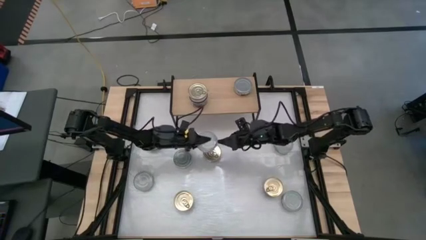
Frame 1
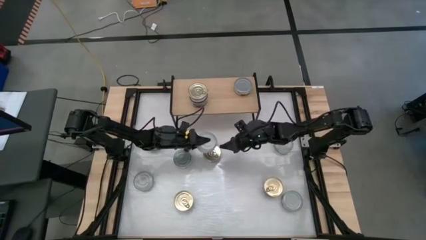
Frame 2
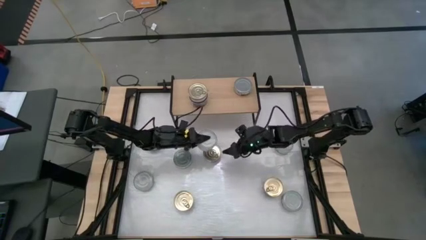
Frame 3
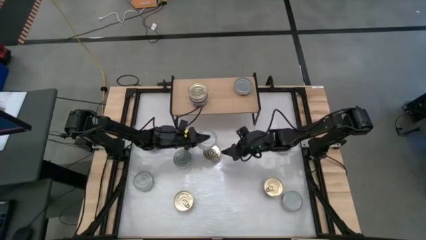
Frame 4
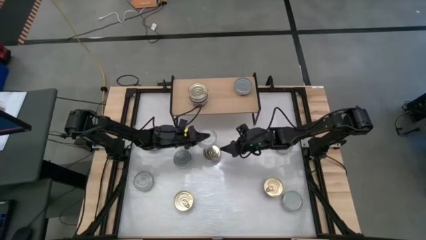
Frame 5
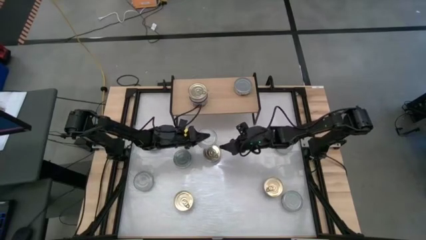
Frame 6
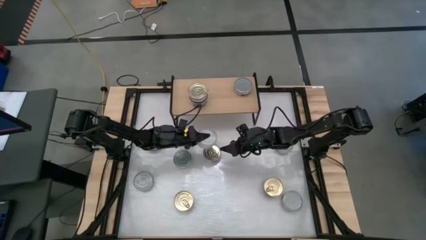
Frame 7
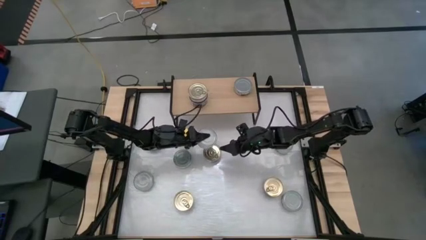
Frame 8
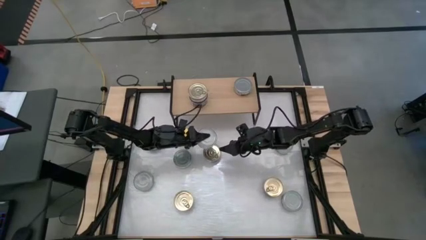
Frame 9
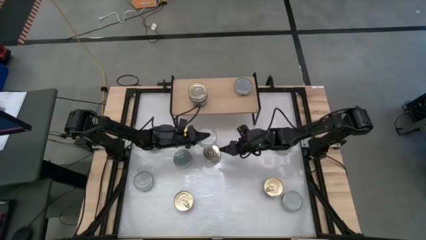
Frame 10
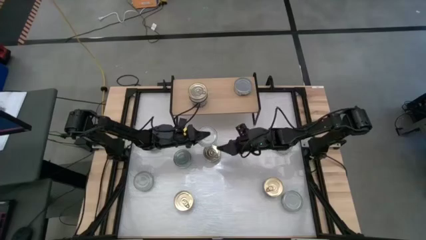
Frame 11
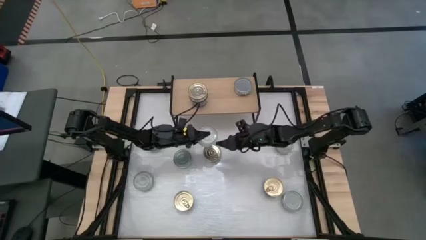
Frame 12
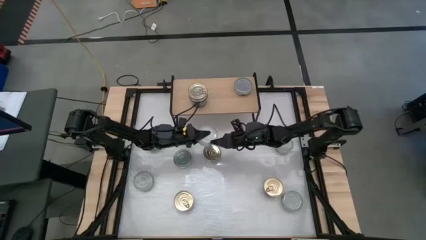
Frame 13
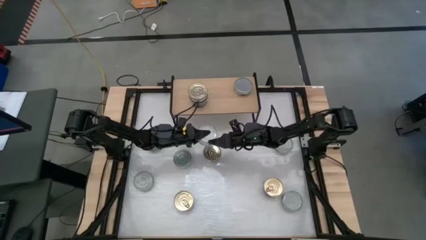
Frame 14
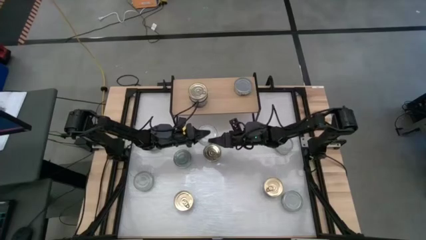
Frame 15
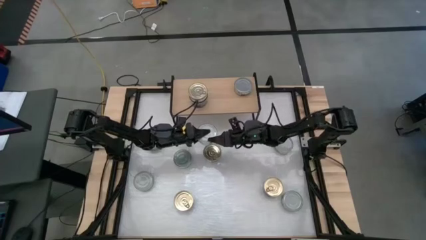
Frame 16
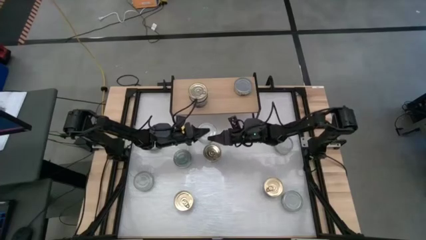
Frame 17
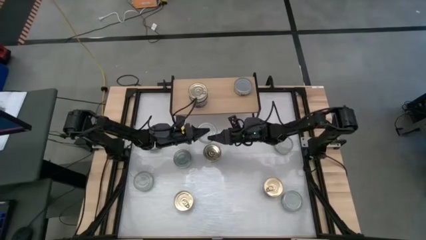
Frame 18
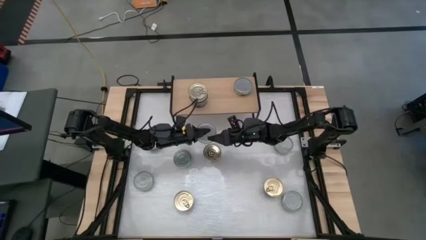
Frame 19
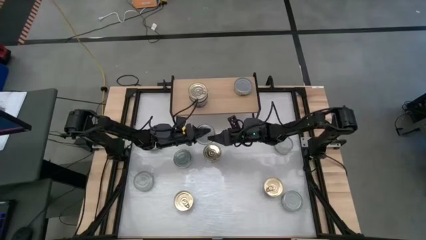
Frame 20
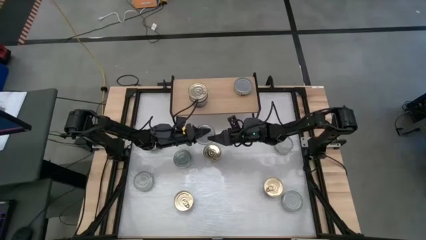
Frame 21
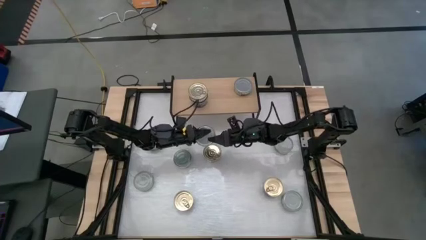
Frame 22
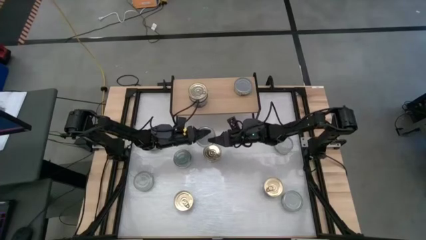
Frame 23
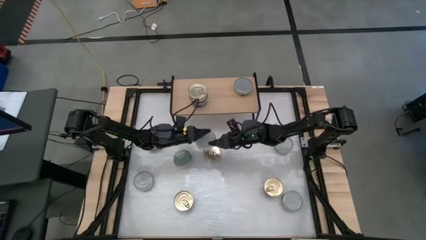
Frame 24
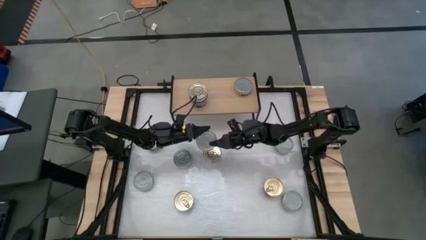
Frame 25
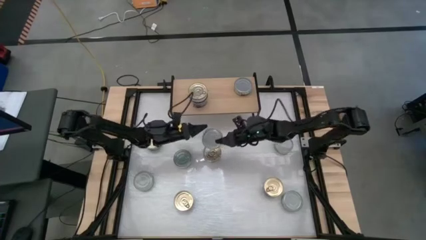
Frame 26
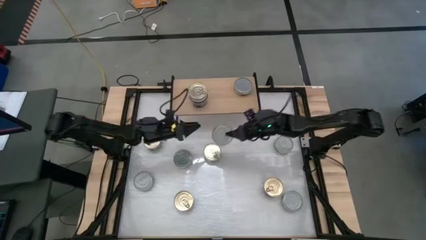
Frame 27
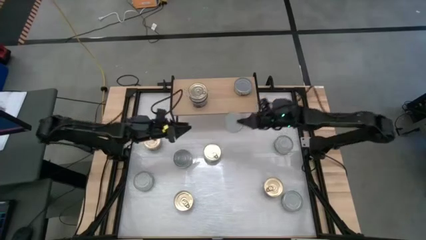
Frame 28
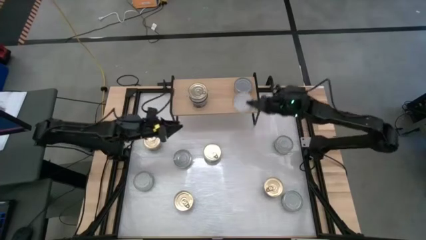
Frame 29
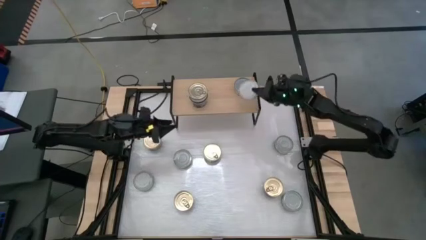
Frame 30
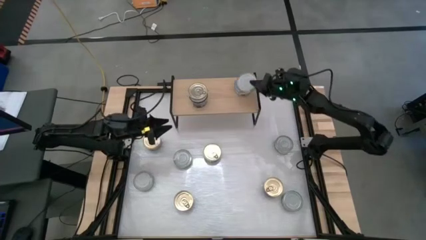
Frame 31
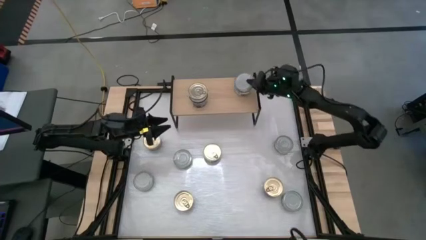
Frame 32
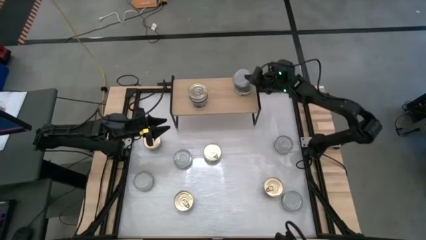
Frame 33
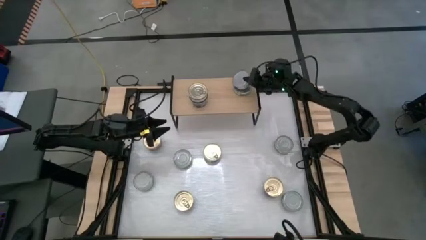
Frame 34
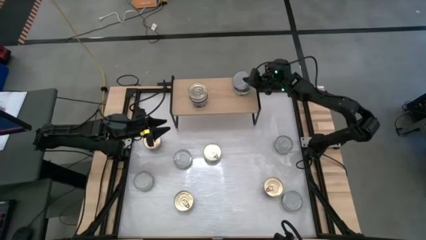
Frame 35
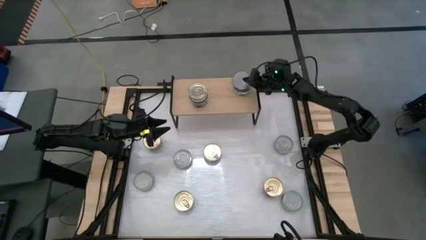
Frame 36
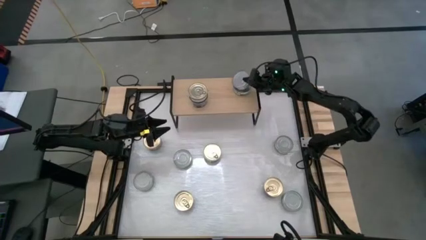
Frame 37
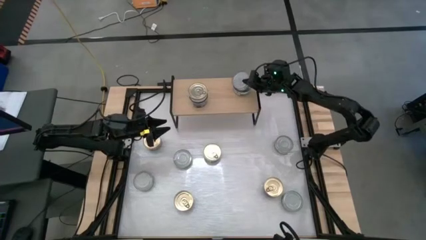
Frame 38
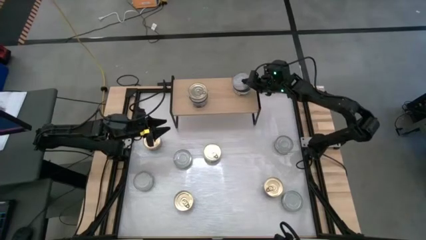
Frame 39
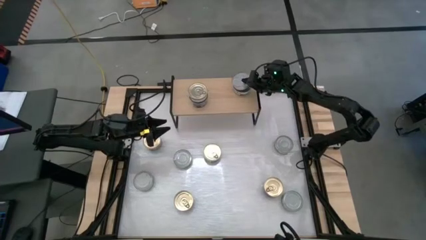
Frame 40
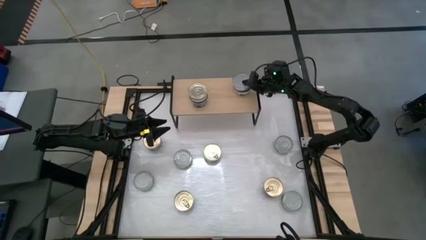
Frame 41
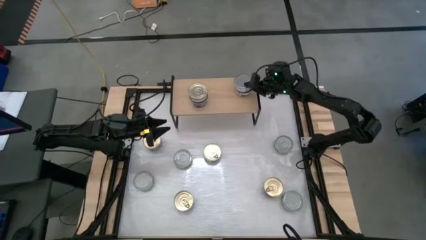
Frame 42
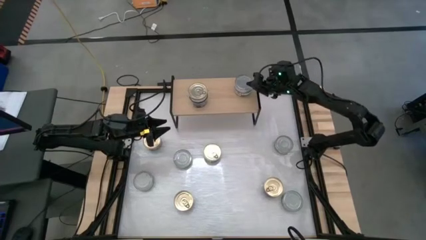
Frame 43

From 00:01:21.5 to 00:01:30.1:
Task: Stack canned seafood by type on shelf
Stack the green white tuna can on top of the other green white tuna can on the shelf

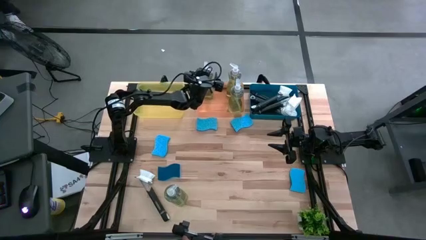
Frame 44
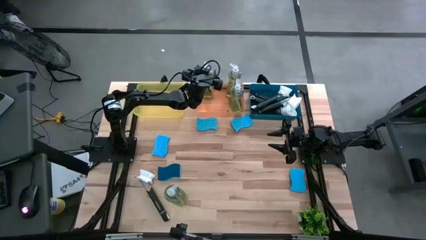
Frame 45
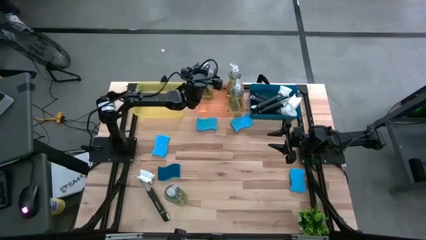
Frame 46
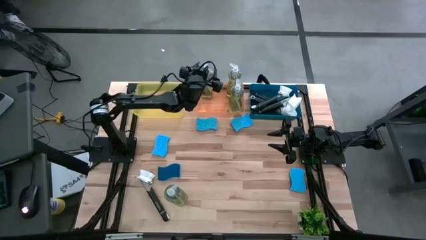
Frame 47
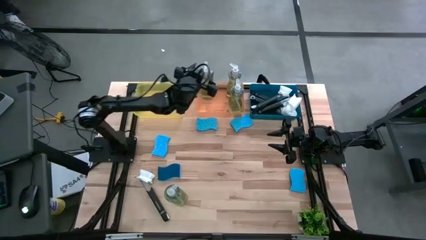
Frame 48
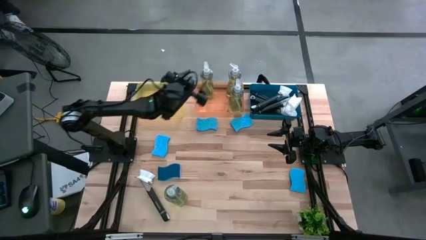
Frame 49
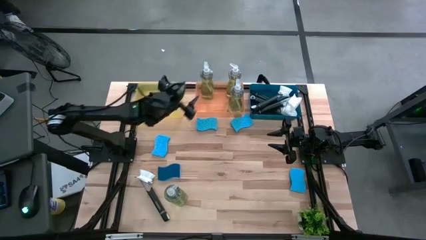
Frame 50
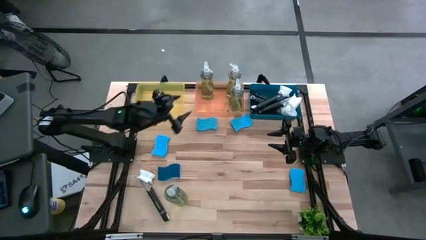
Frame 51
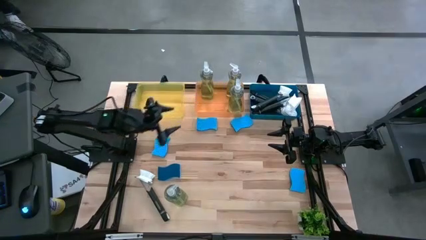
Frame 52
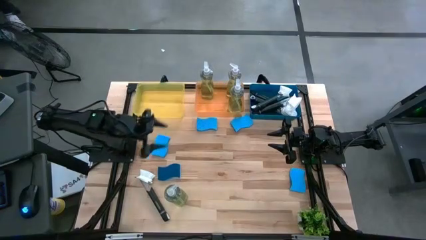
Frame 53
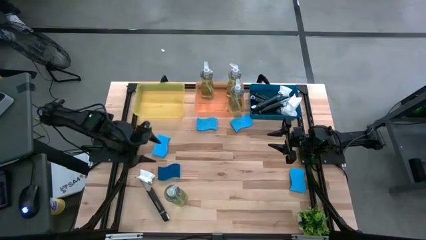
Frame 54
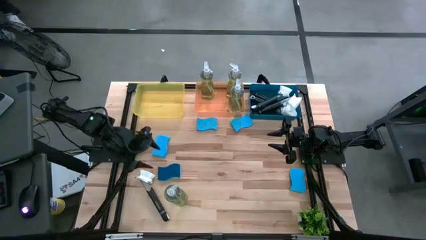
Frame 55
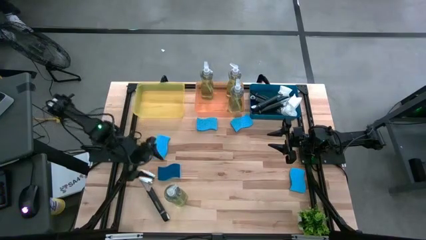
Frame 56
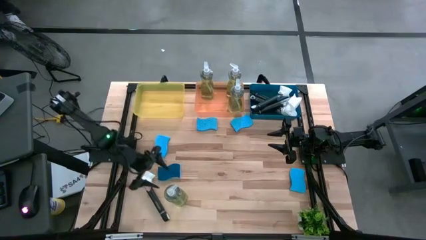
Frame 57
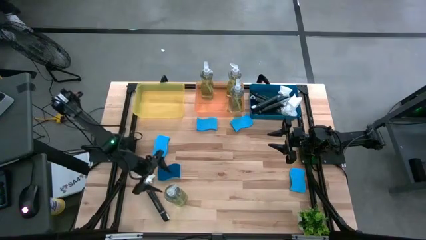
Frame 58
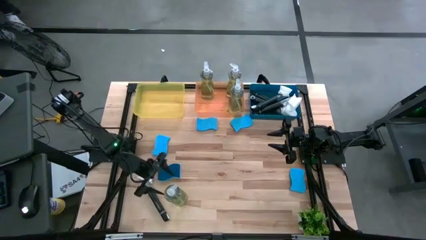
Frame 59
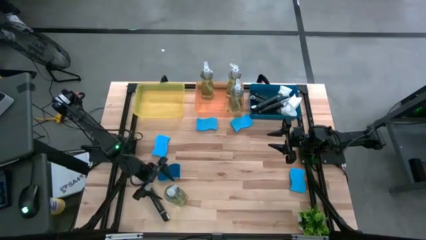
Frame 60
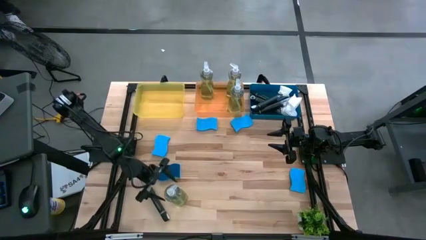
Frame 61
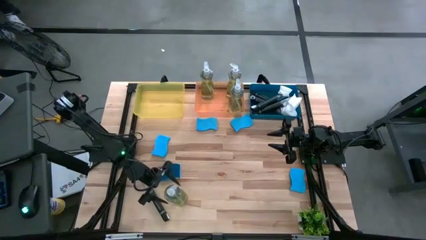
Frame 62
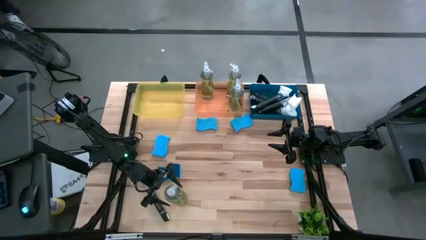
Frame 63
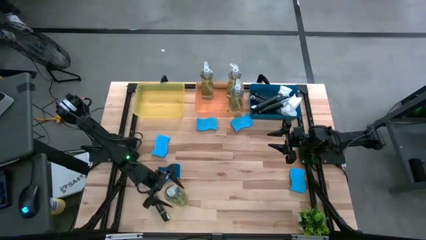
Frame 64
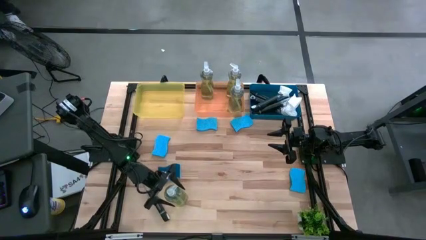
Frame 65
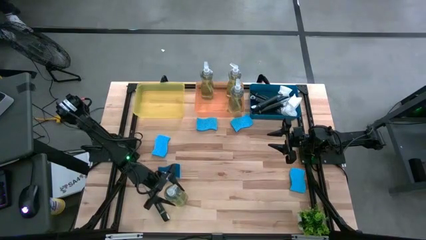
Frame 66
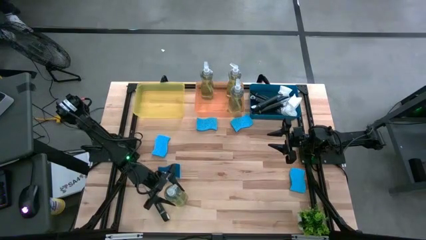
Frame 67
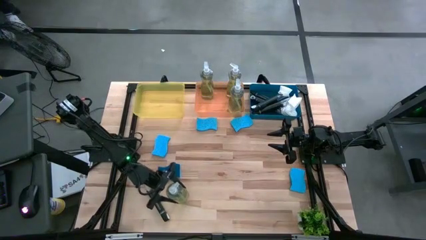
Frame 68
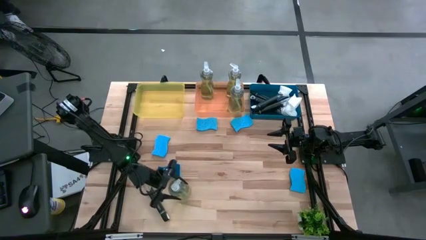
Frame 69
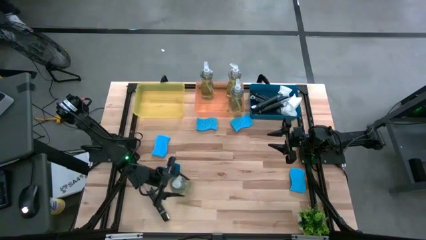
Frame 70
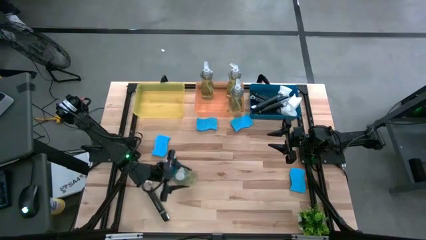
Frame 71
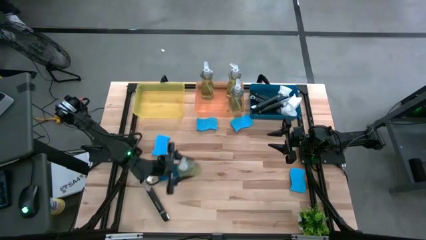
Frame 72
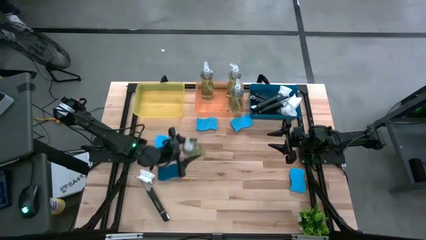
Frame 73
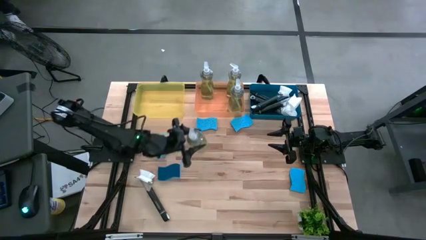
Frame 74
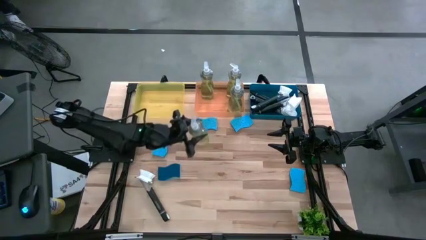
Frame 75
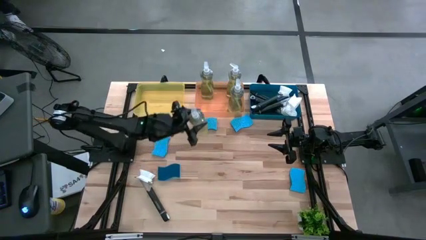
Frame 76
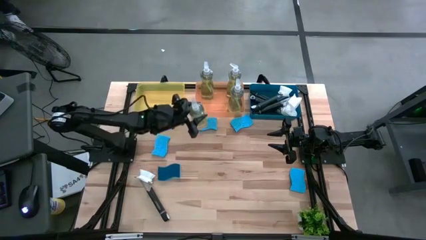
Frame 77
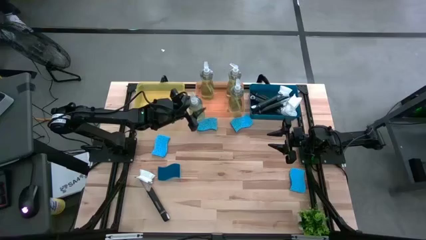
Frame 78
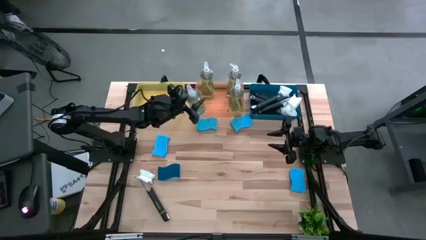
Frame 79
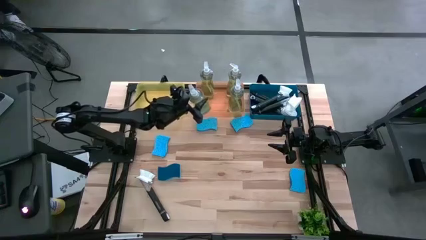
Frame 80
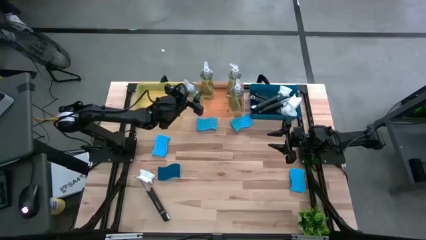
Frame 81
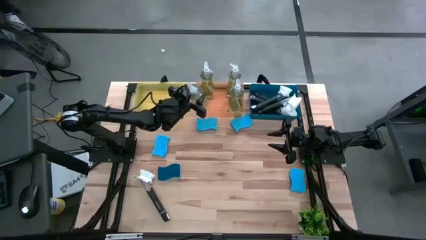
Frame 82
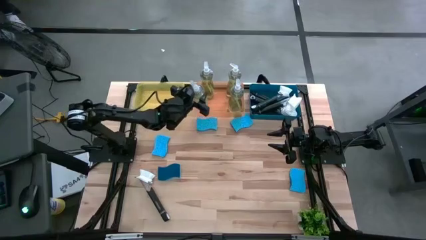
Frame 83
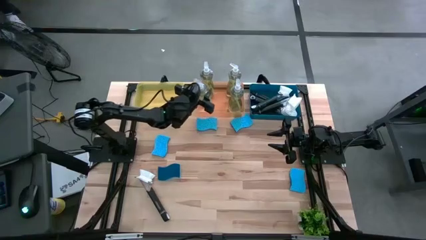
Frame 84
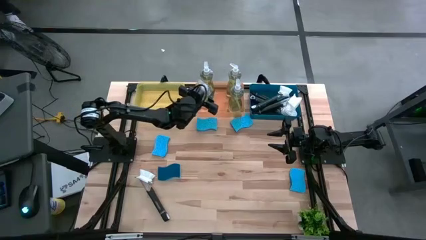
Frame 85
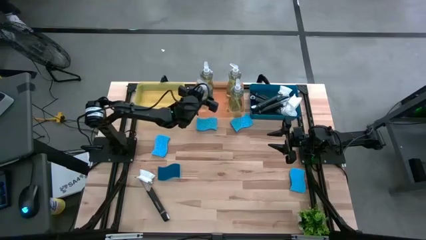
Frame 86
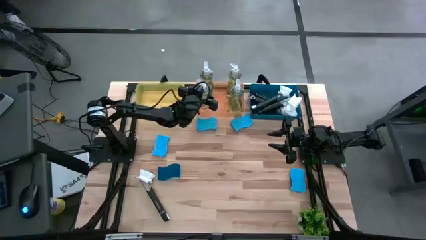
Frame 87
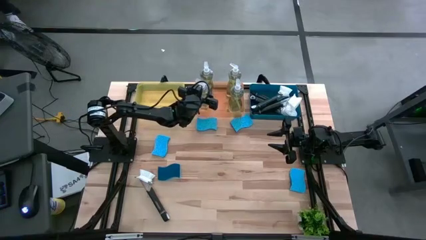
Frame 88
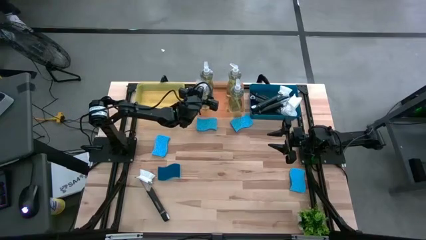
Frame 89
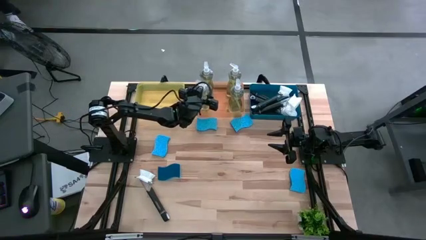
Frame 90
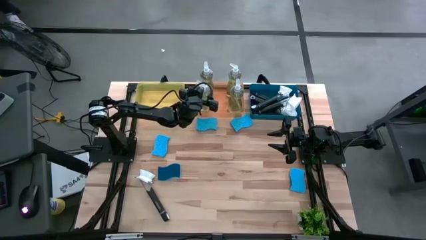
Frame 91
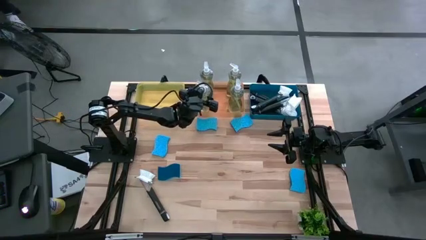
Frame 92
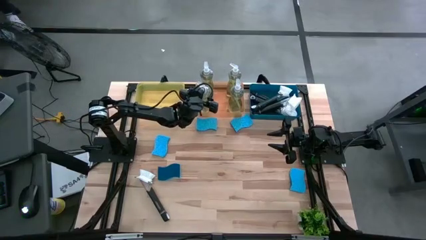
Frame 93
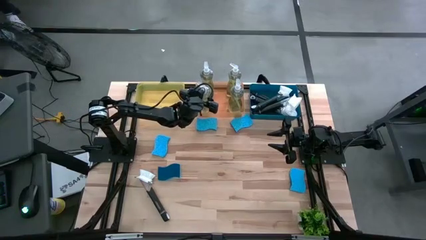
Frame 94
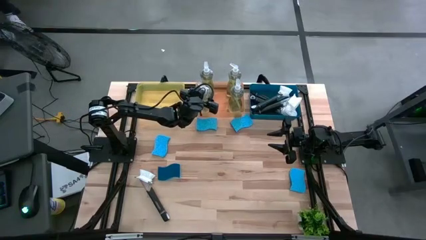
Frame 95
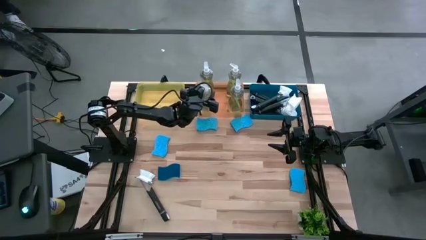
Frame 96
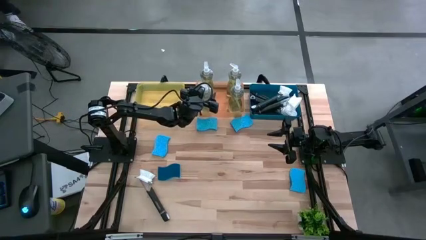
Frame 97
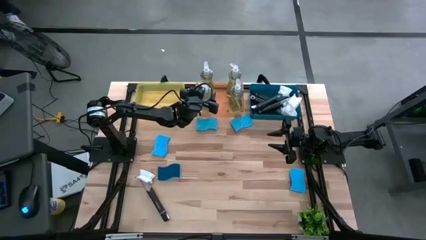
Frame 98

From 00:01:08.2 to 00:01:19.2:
Task: Pick & Place Kitchen Sink Supplies
Put the transparent soap dispenser into the orange bin
